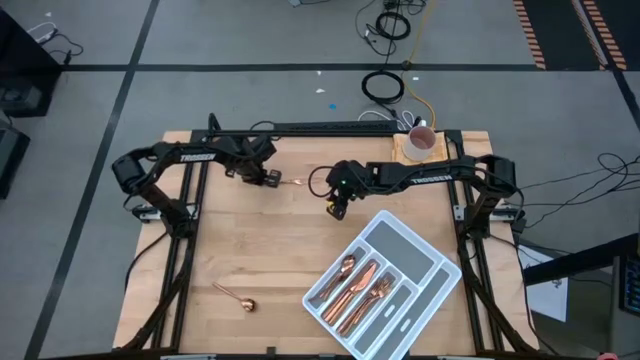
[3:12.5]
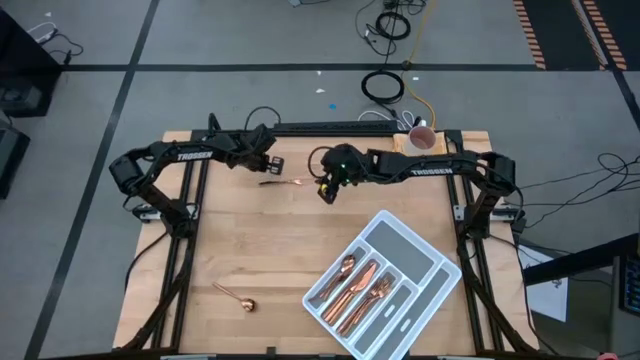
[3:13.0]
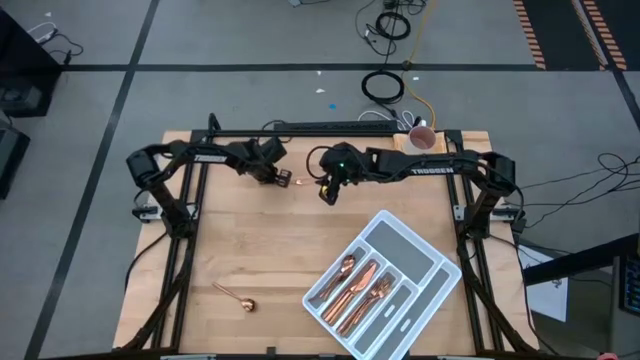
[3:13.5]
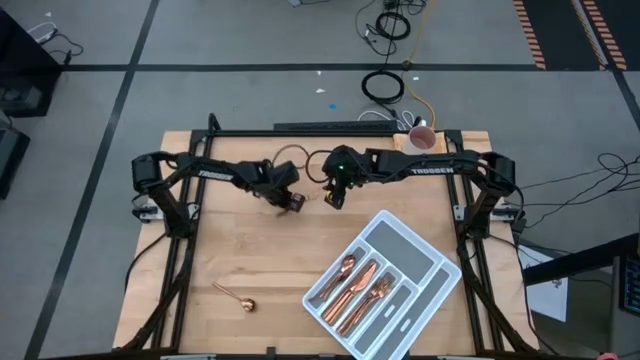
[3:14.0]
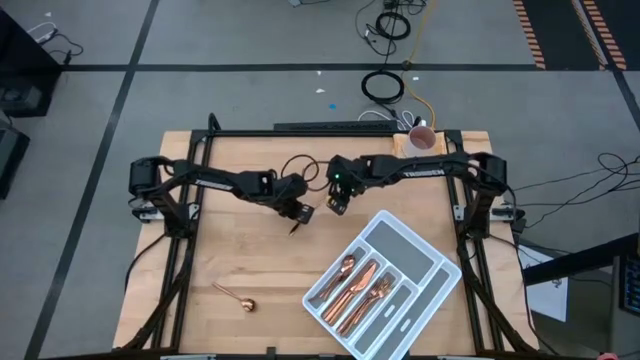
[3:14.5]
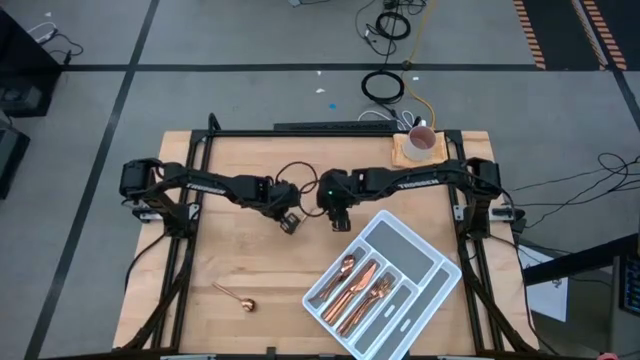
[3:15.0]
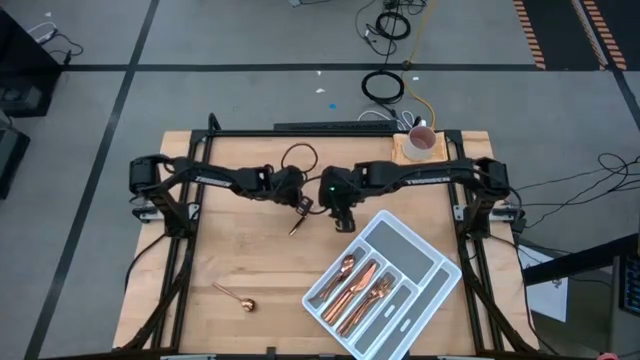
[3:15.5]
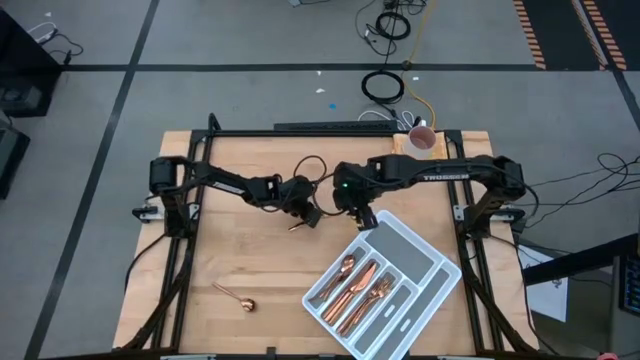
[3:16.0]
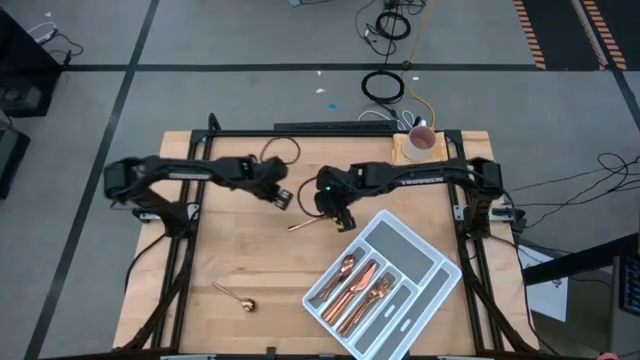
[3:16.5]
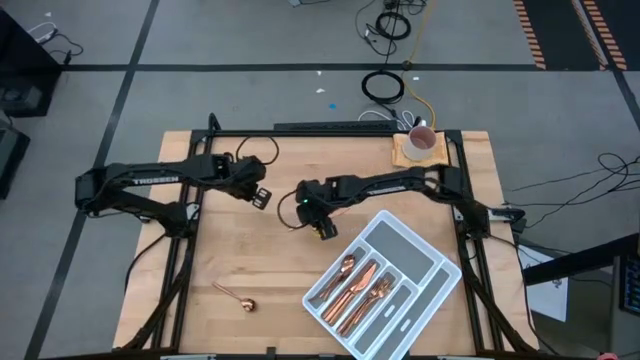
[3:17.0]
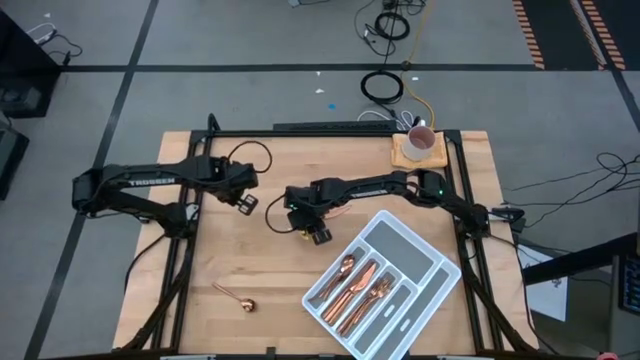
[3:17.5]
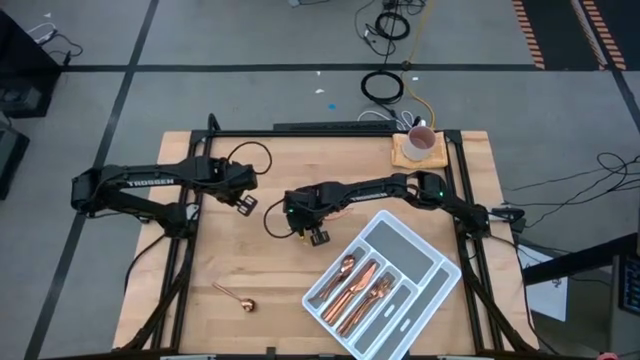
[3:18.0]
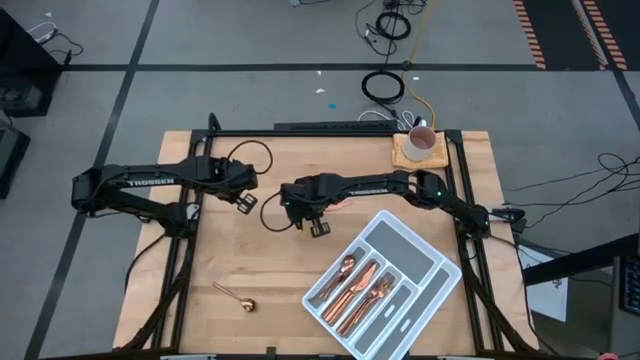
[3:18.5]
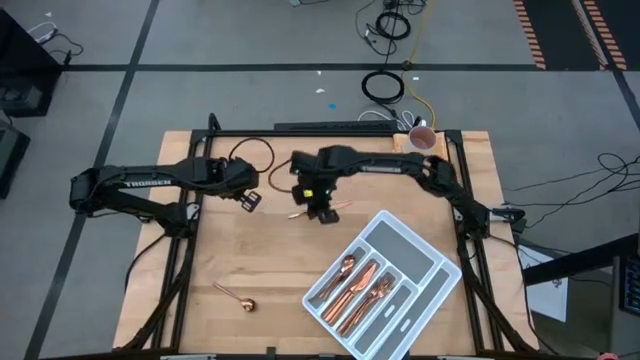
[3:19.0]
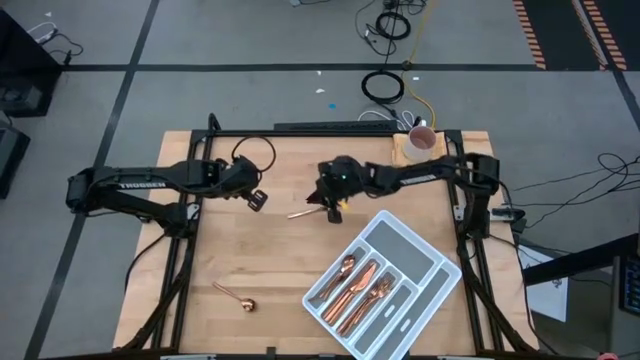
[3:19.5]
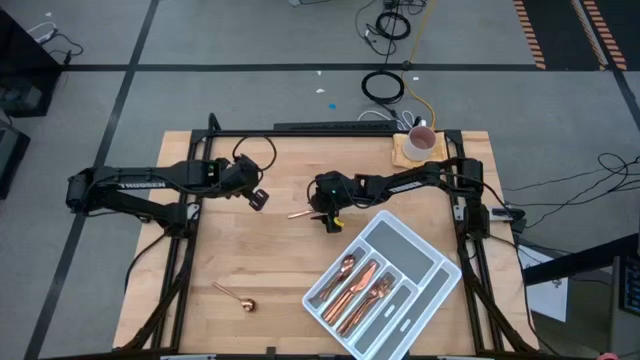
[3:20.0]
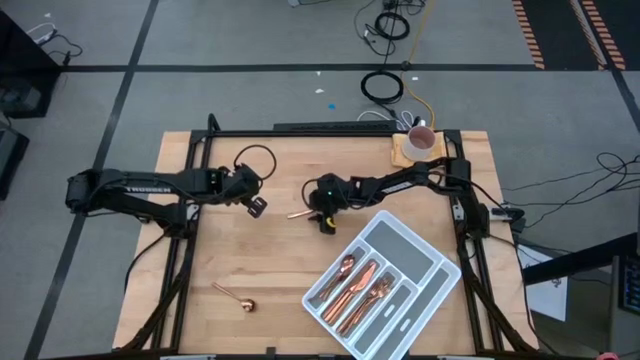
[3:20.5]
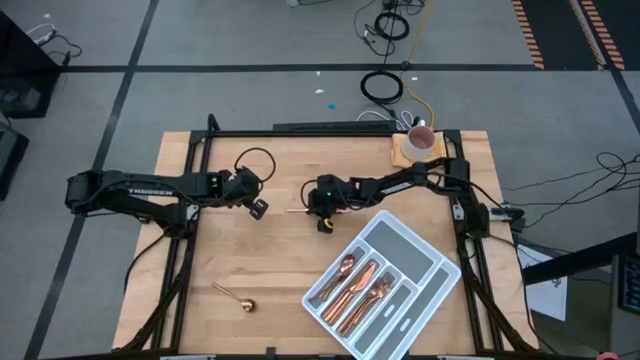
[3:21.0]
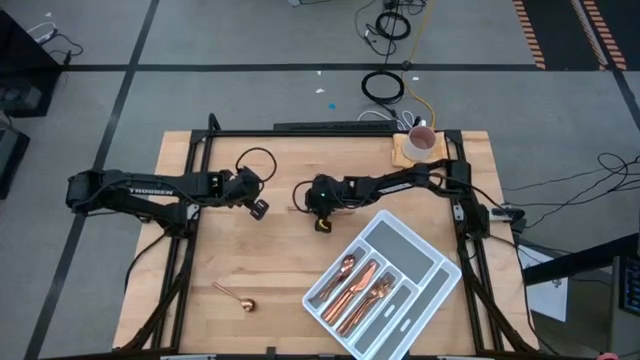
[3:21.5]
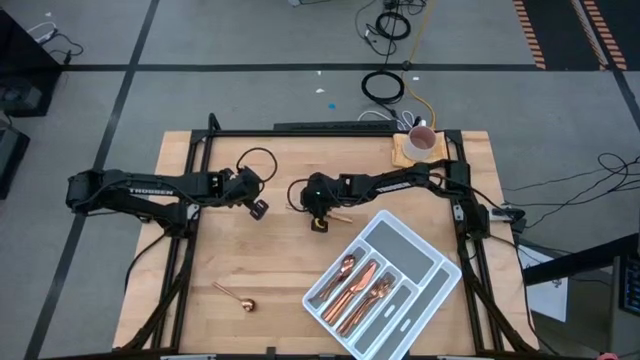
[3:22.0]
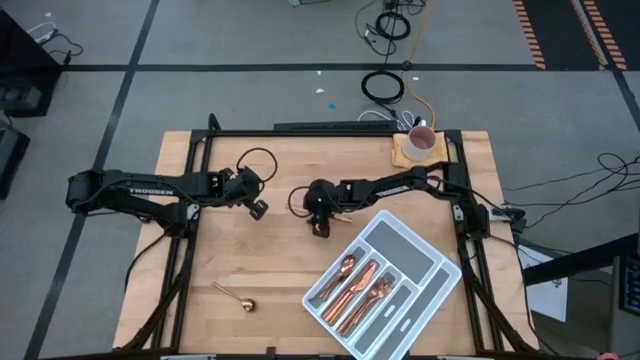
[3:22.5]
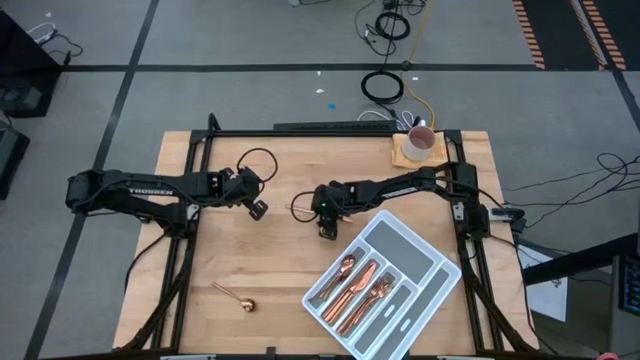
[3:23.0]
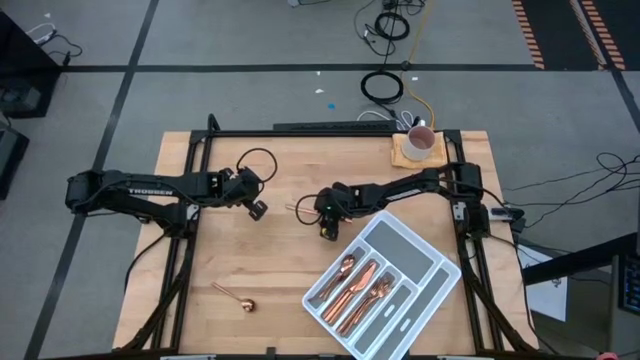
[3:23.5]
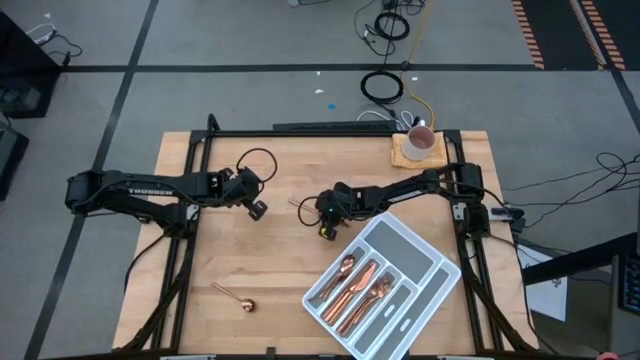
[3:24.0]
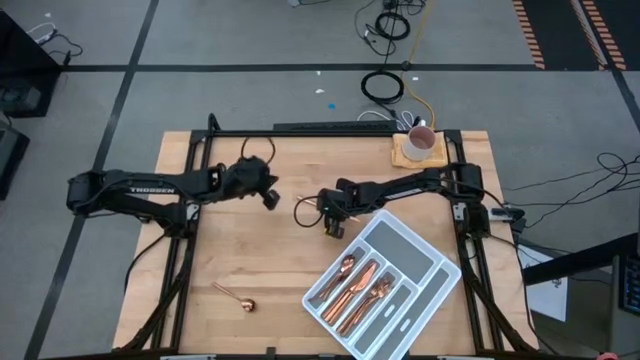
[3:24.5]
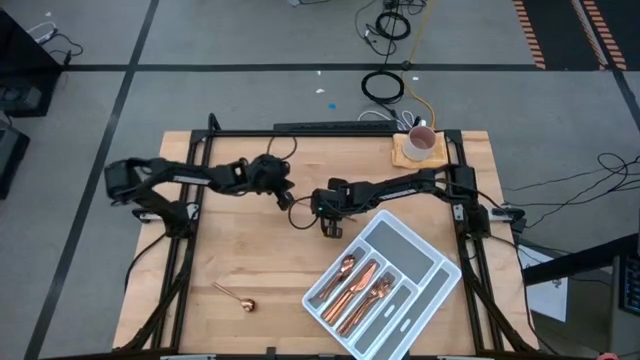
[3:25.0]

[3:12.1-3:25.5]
Task: Sort silverware
Put the gold table knife into the cutlery tray with the other gold table knives

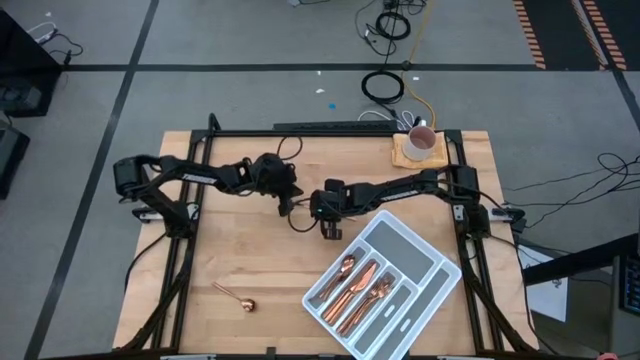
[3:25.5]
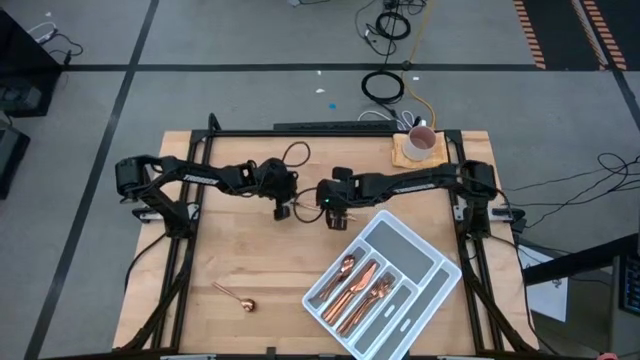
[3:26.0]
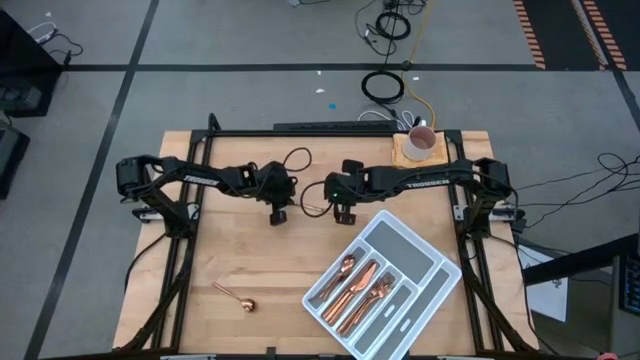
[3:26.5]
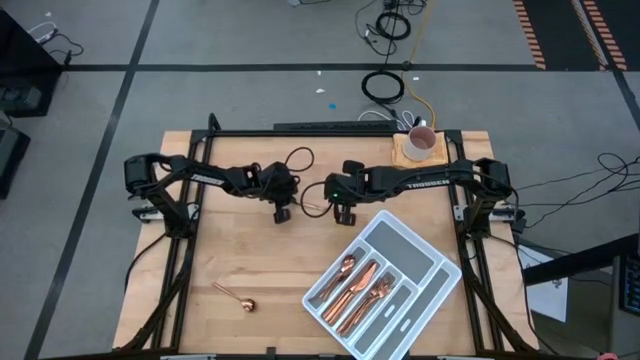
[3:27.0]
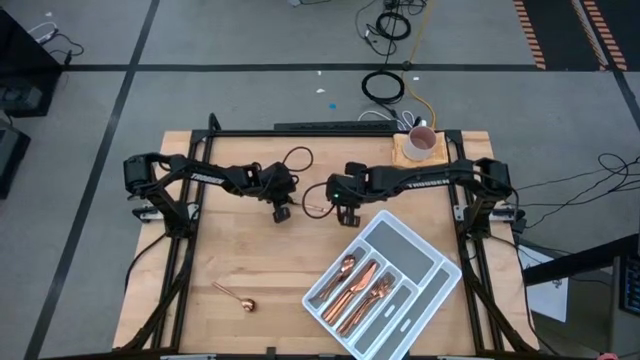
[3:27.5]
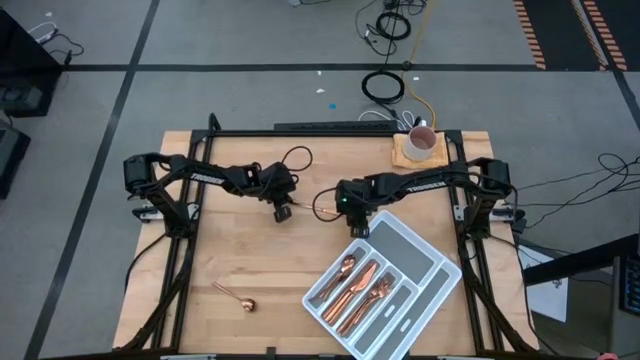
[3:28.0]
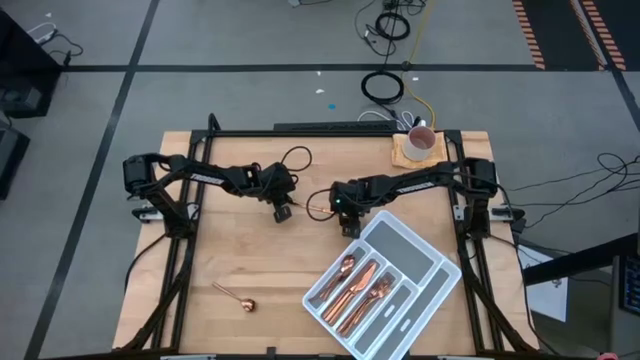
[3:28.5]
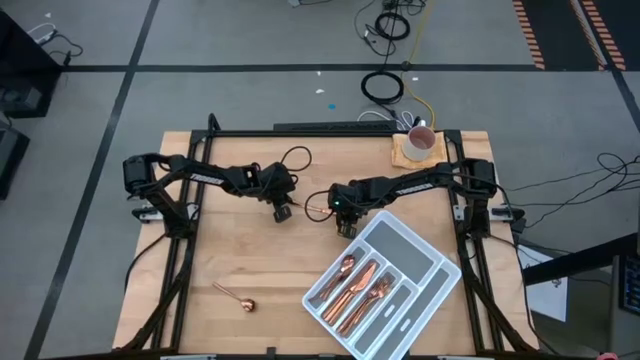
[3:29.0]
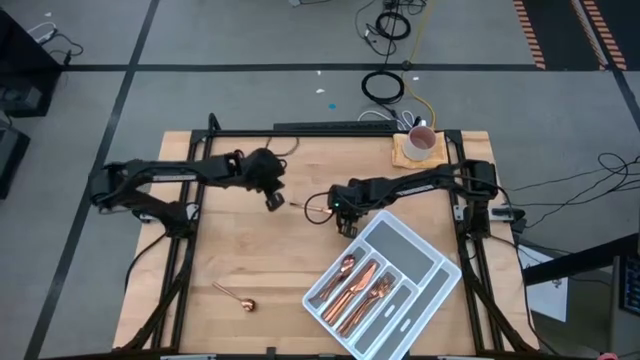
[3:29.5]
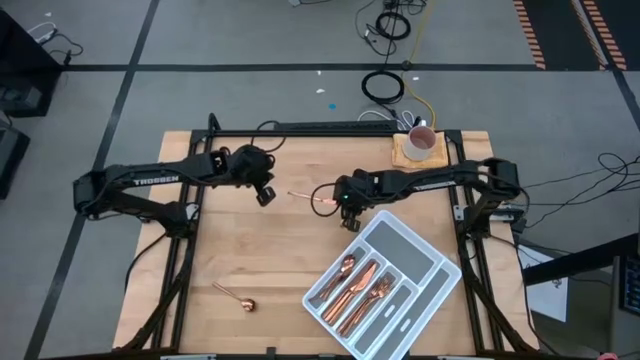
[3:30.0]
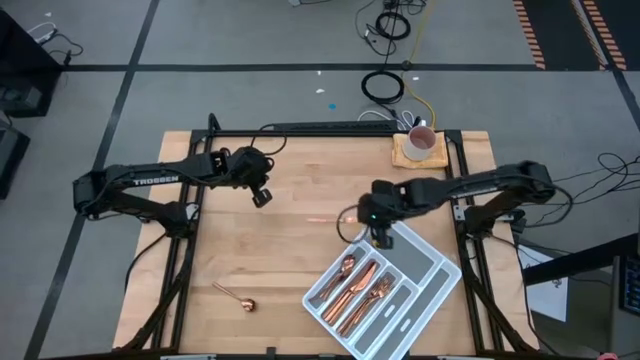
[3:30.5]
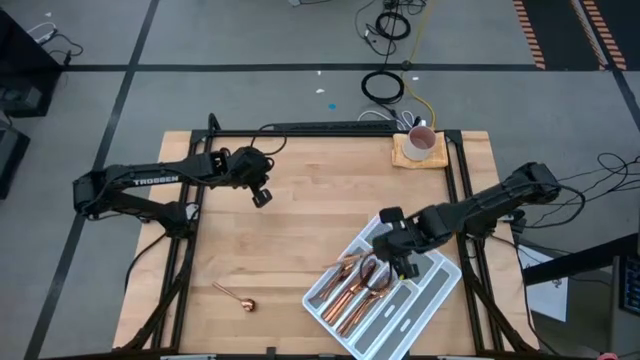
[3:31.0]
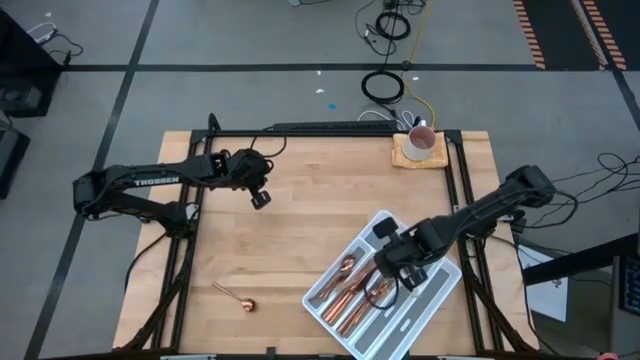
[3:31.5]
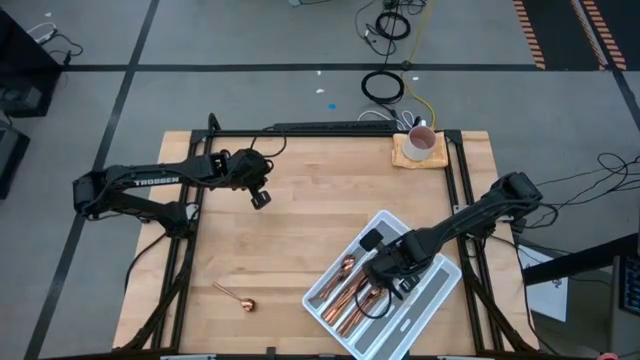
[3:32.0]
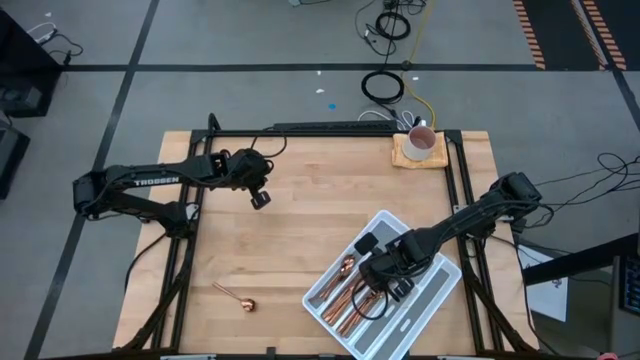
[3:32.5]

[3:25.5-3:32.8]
Put the gold table knife into the cutlery tray with the other gold table knives

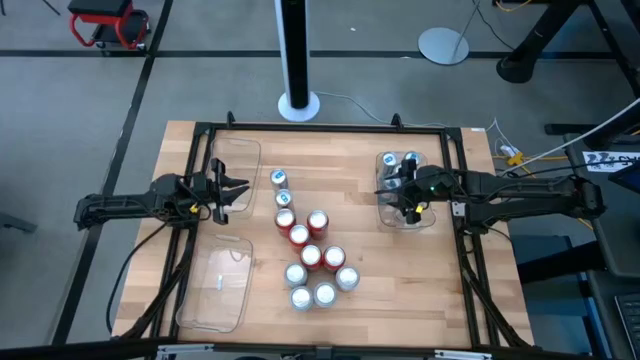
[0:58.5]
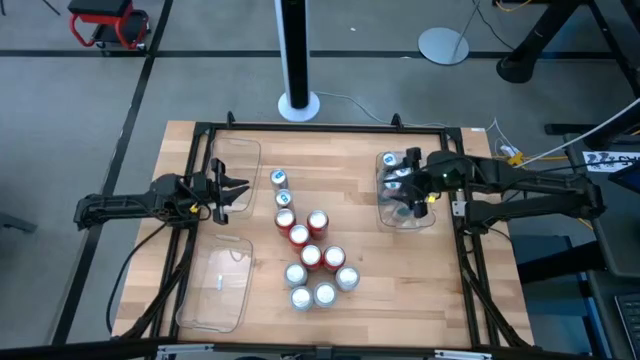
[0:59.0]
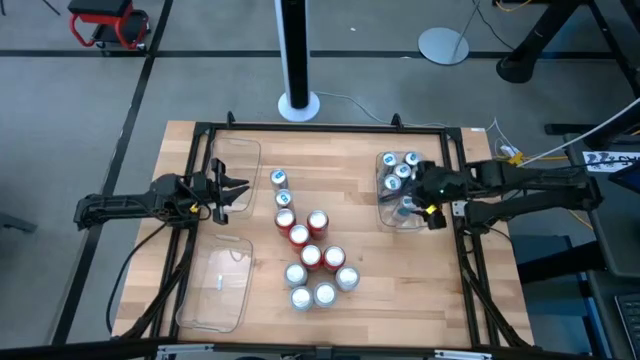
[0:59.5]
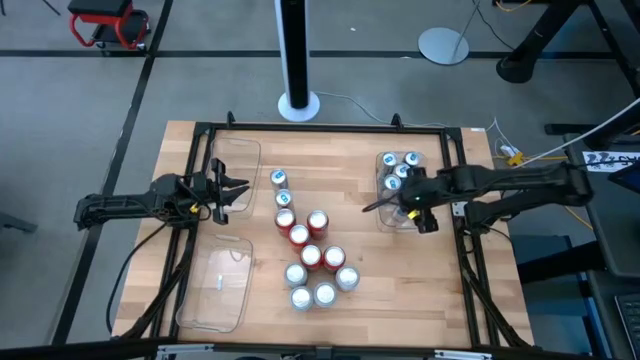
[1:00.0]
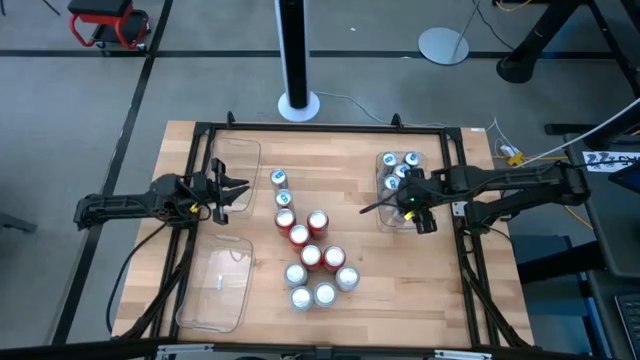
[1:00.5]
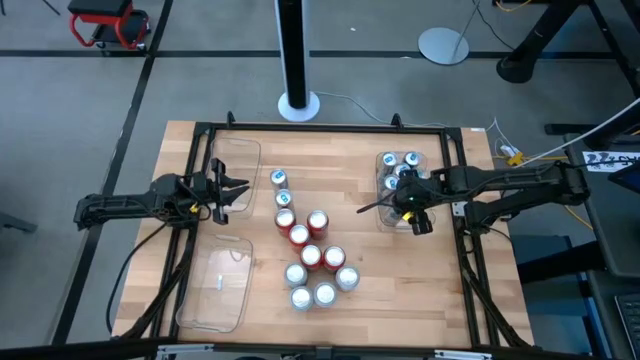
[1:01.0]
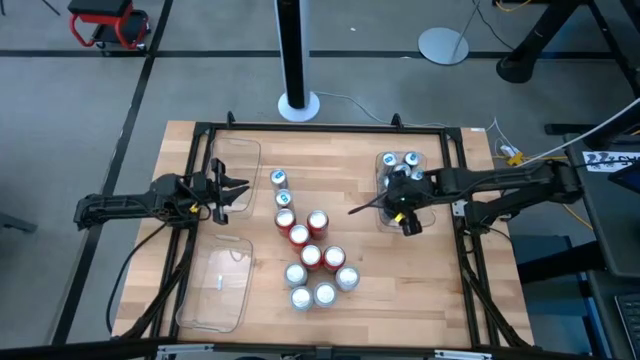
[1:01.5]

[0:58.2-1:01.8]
Task: Sort soda cans
Adjust the blue soda can in the middle right transparent bin
